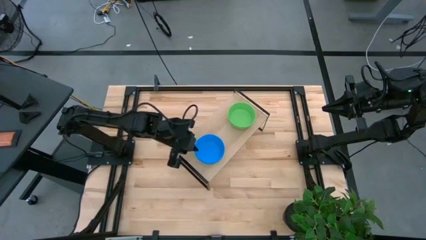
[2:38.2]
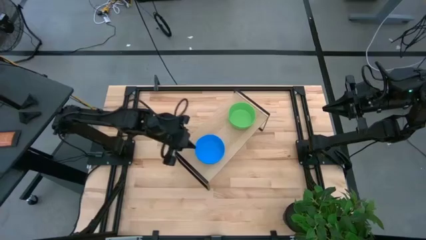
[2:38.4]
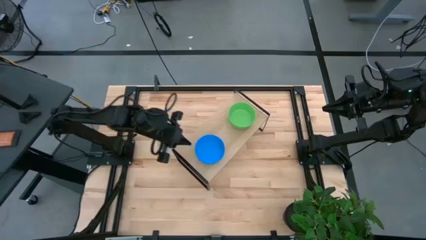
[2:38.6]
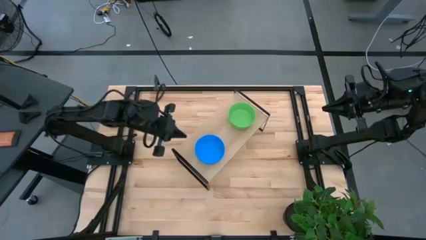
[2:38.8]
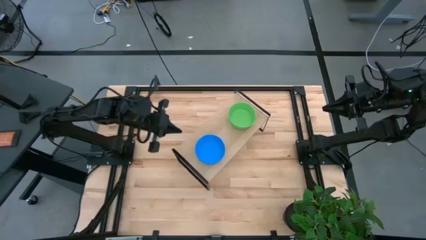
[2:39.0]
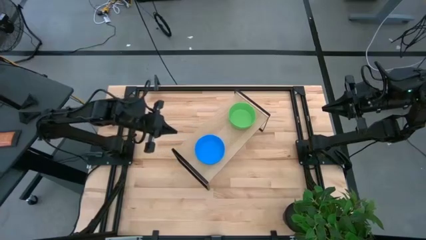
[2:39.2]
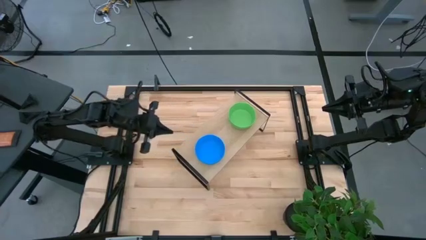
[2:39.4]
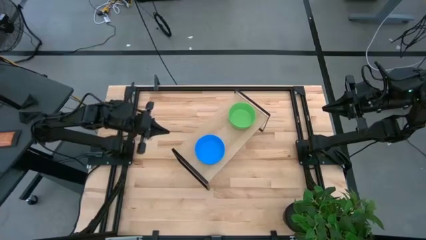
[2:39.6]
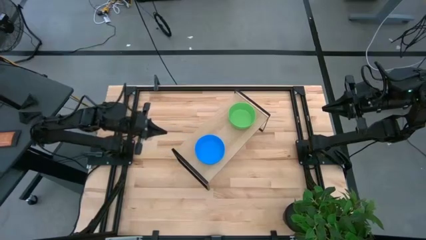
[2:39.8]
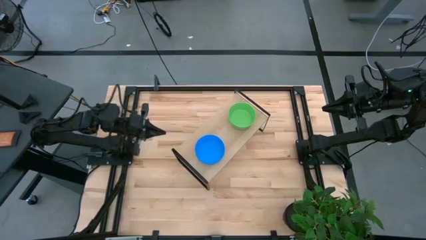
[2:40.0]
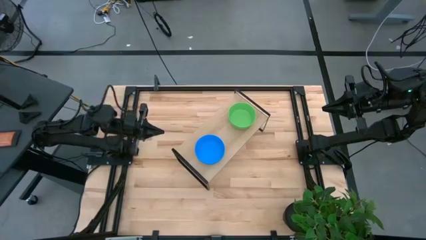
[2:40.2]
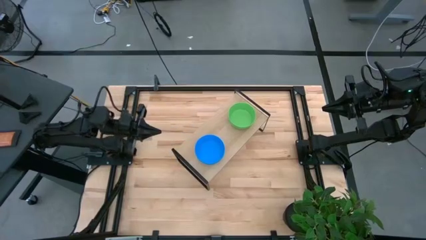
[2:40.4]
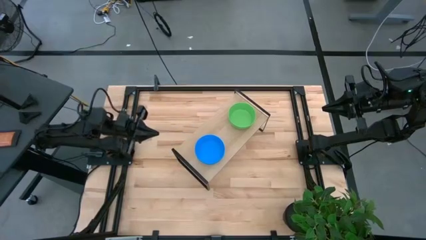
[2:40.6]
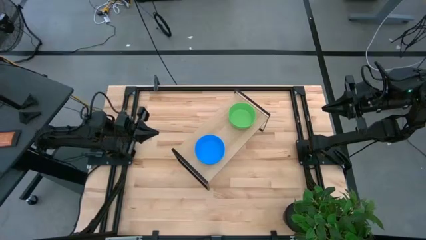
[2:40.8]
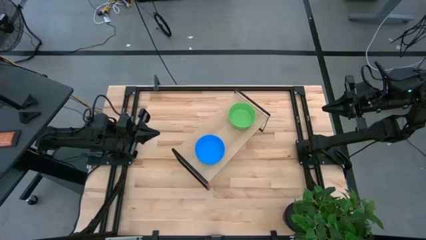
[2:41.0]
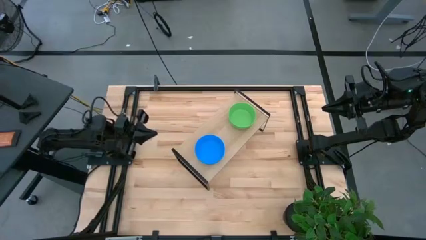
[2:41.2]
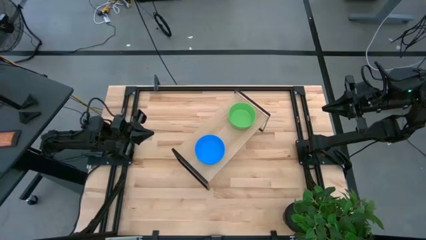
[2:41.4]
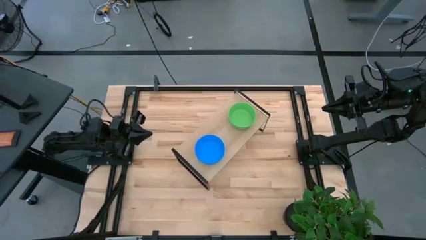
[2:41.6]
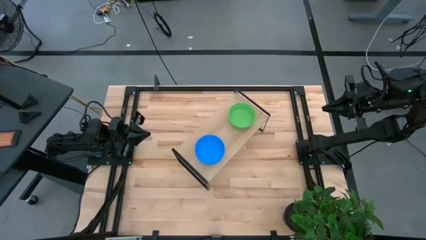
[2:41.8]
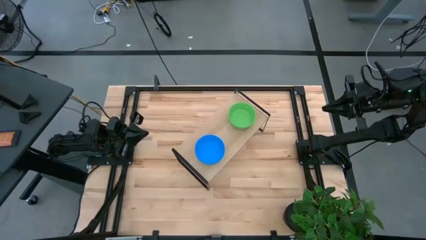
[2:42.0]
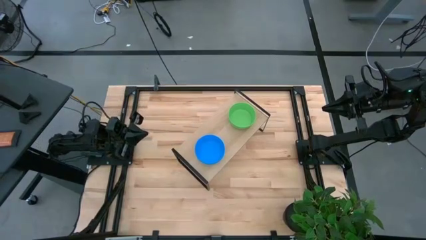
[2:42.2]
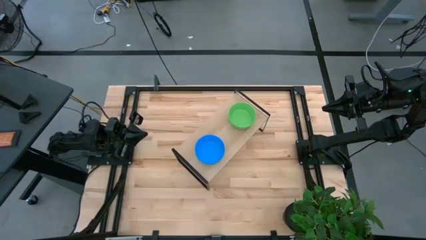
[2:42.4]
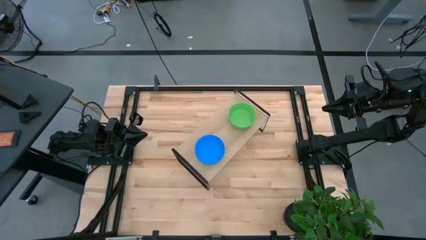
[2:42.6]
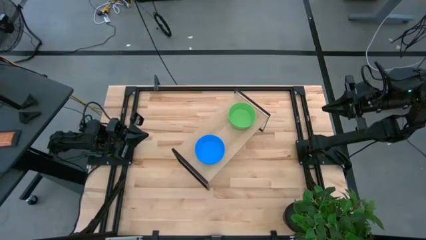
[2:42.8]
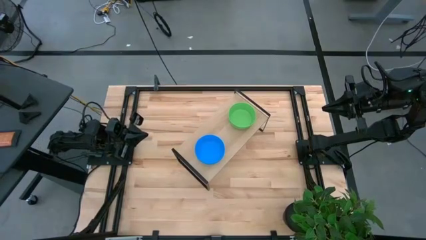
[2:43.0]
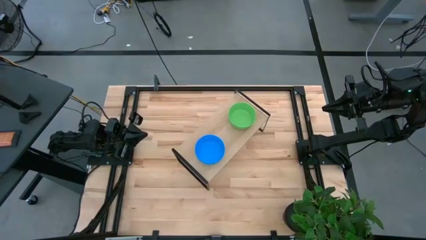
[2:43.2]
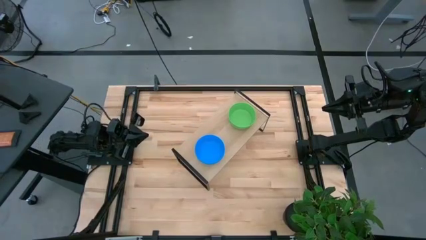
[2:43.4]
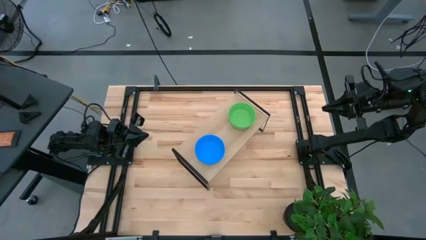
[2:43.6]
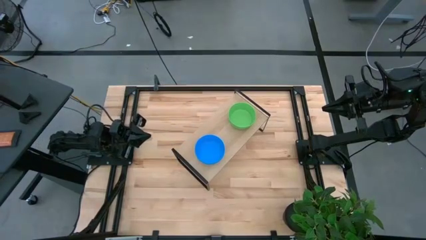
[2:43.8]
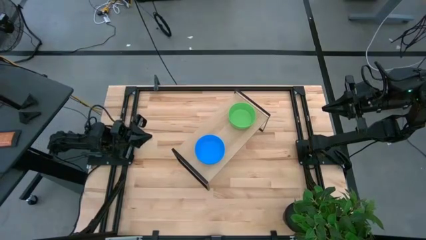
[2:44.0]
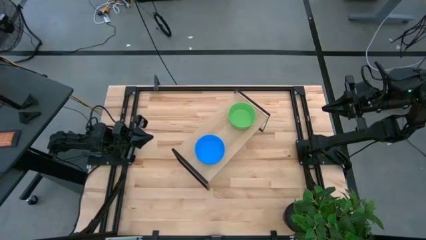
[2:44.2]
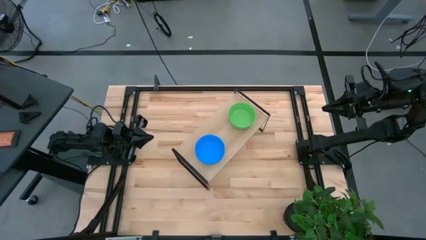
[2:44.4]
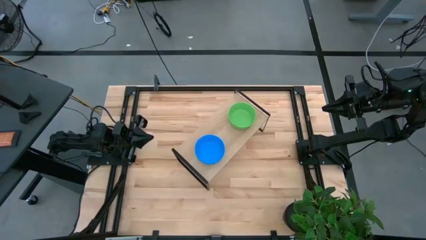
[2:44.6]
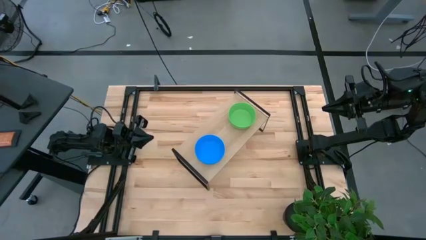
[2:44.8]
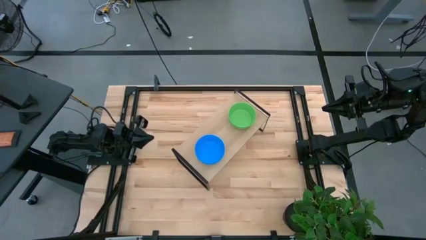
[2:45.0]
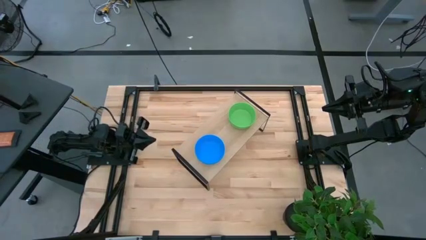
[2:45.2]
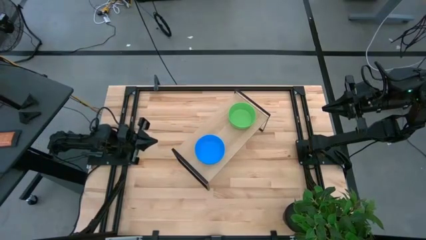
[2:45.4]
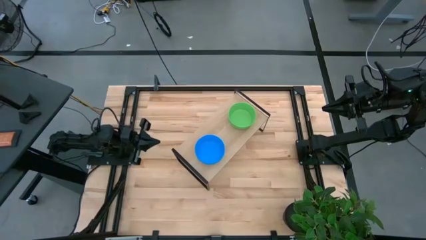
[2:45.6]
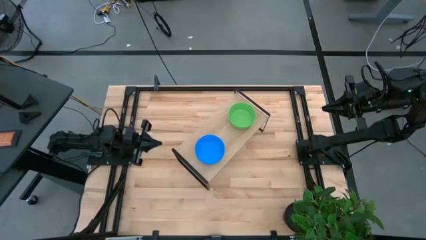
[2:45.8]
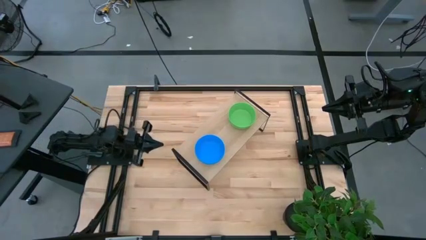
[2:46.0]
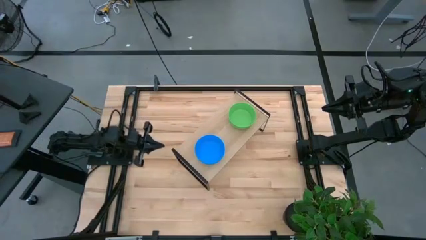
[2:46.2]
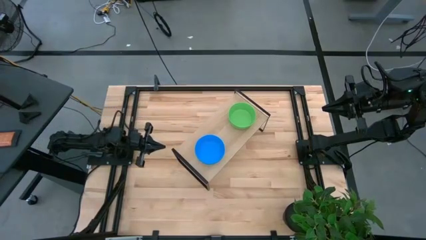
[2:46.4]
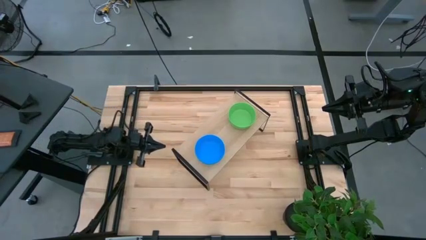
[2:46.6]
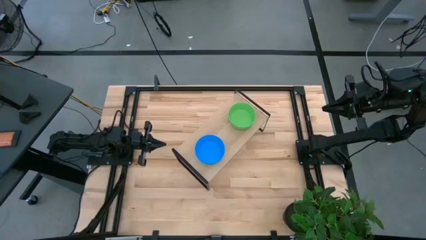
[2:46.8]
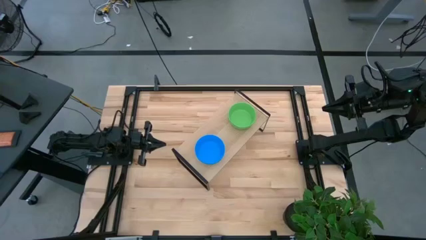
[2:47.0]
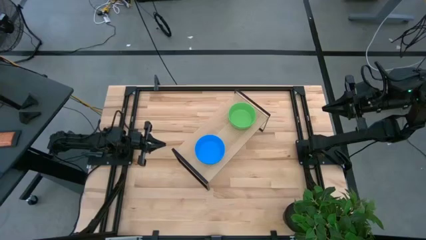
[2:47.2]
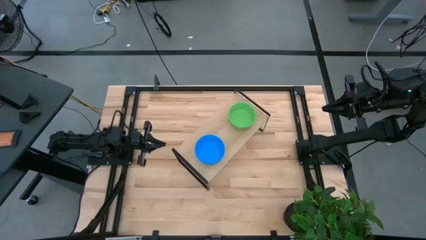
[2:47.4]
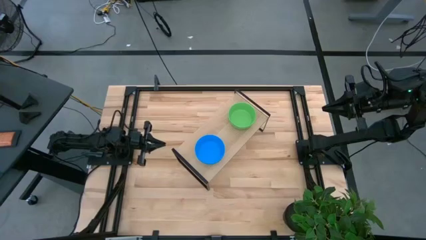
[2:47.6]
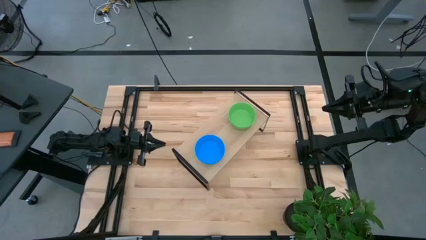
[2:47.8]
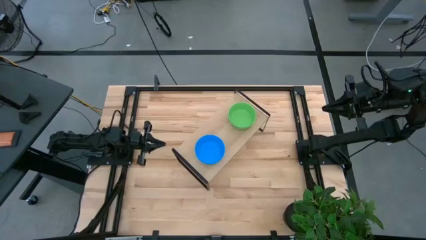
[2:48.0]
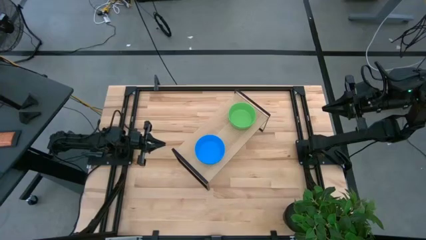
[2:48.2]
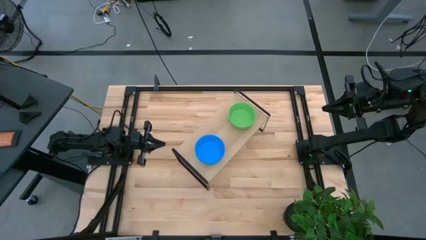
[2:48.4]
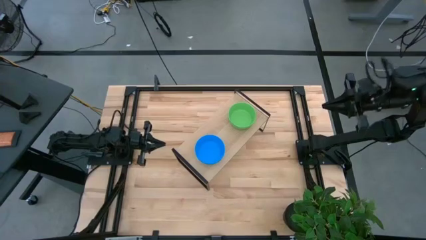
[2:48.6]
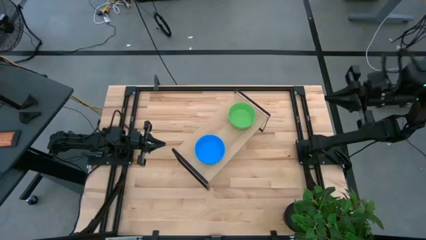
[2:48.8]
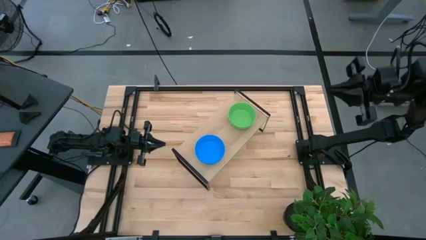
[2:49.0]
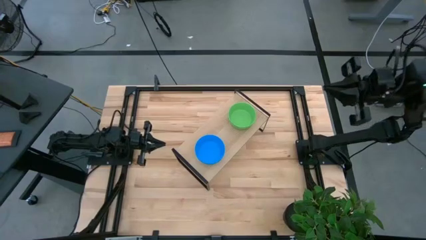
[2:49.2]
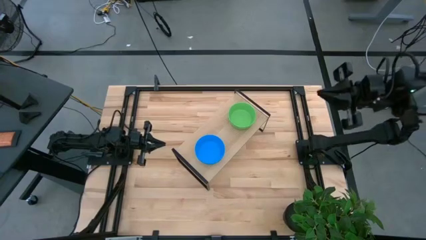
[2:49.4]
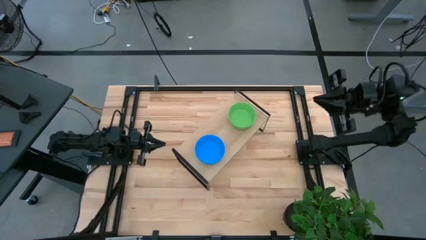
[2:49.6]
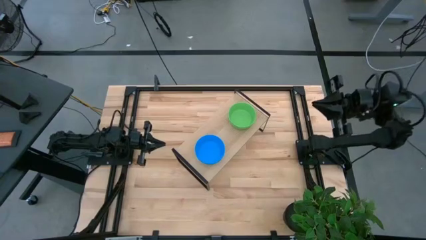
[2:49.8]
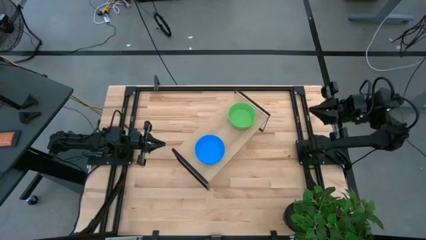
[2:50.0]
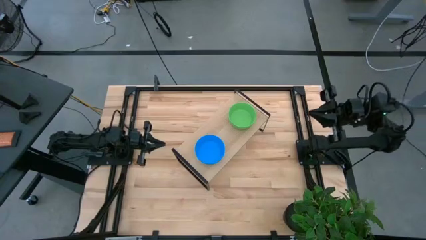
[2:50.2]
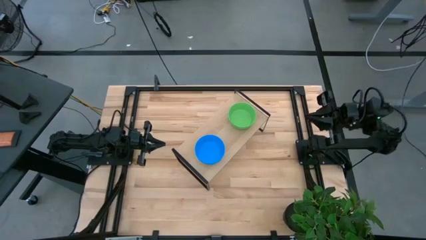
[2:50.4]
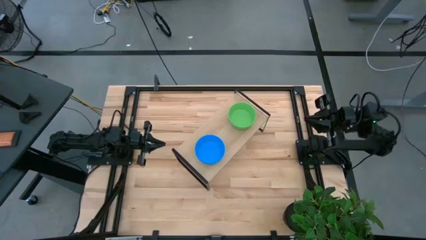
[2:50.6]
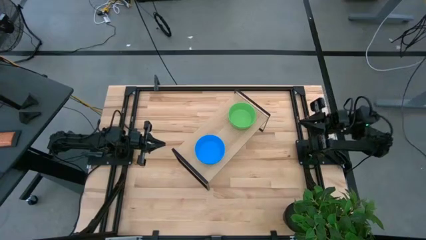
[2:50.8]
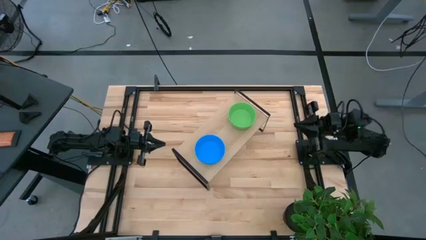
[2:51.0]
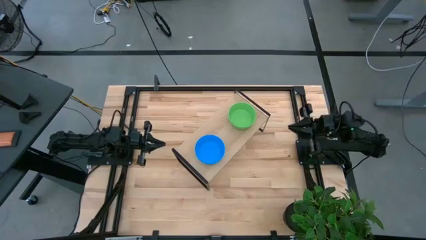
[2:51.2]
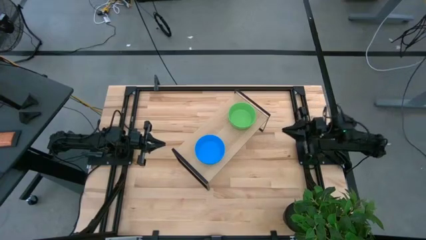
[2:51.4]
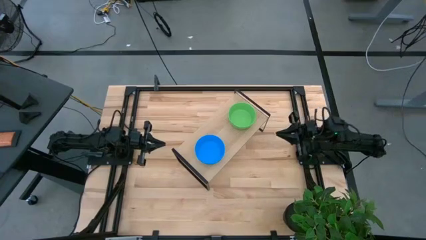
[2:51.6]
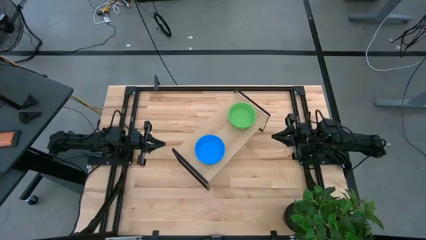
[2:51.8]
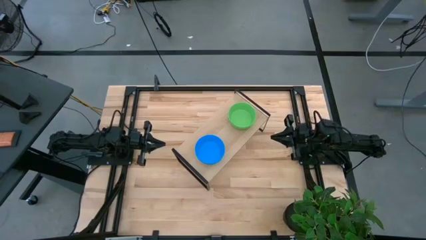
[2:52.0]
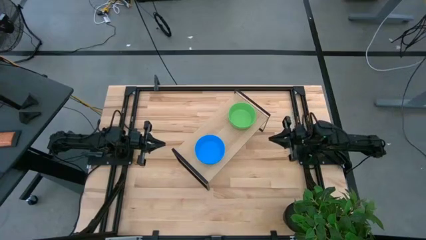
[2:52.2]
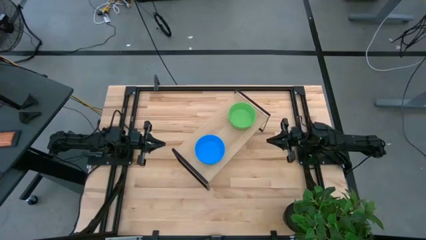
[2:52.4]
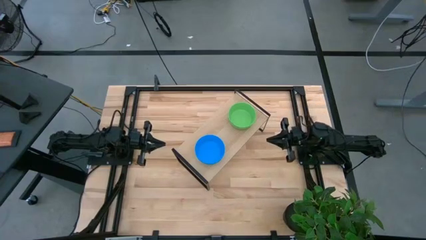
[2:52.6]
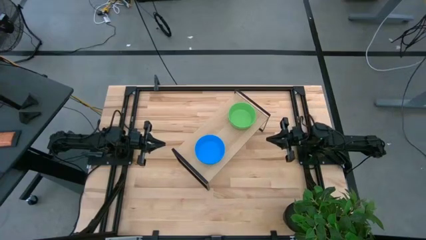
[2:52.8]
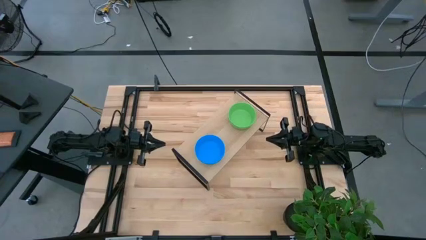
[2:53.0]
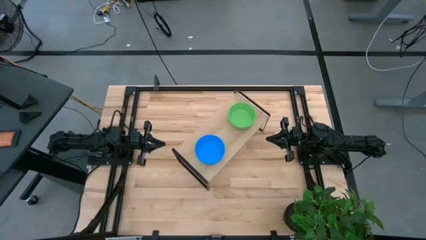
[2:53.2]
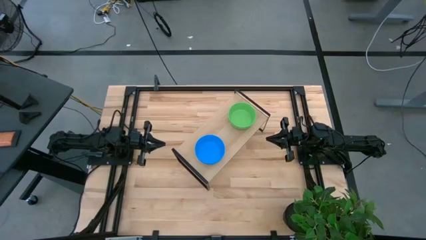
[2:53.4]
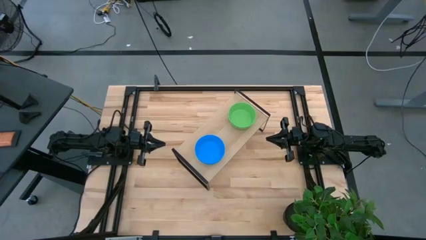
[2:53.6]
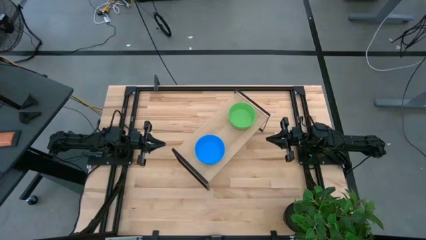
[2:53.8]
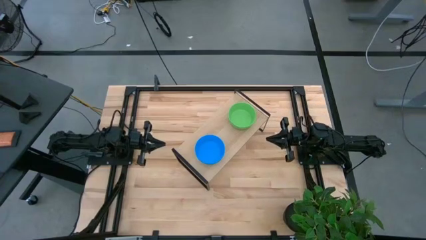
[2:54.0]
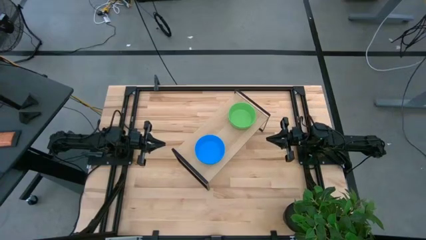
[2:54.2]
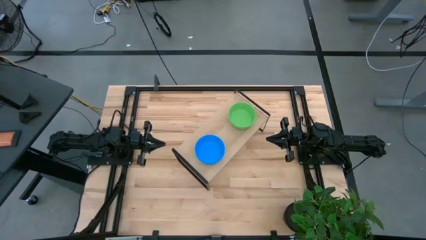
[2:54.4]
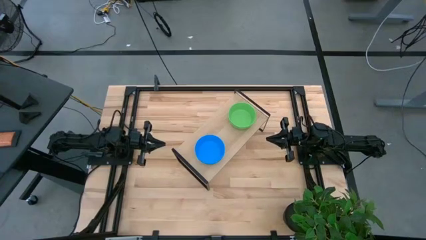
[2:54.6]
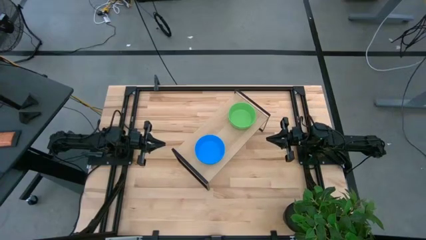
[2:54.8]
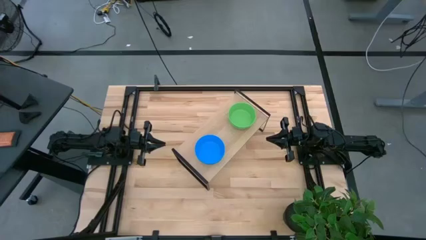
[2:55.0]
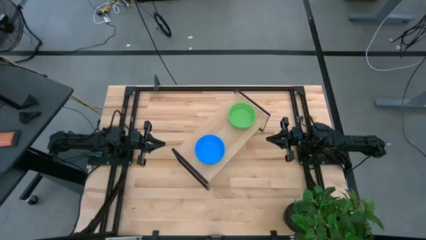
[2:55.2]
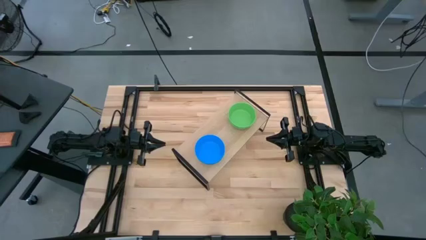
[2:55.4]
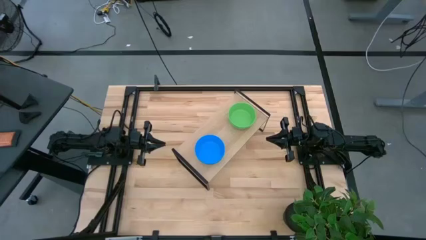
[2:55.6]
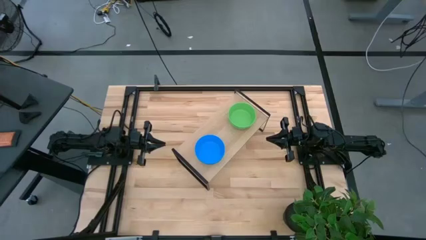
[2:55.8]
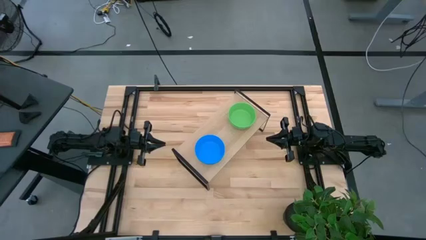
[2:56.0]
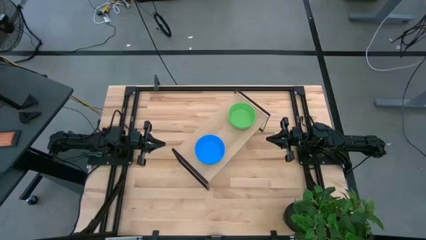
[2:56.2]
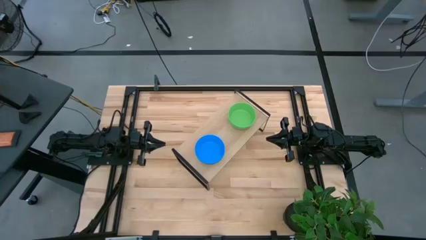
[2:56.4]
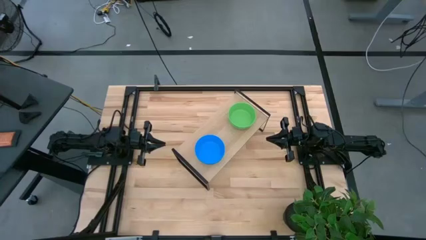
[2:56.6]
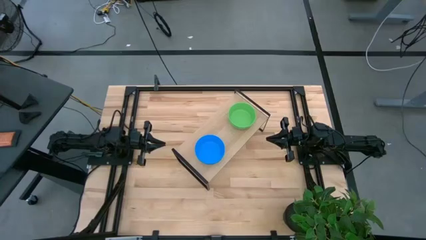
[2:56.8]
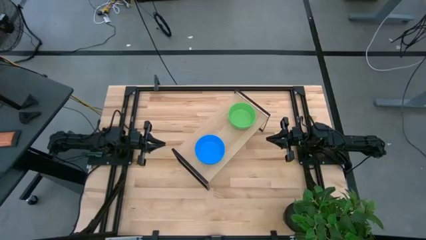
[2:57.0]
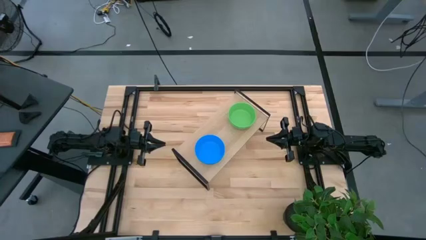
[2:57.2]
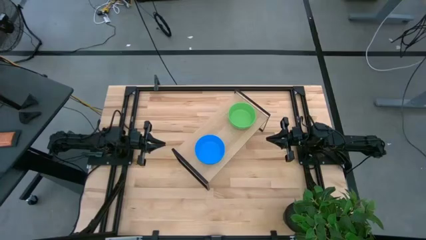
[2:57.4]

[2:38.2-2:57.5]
Task: Pick & Place Mini bowls
Return to Home Position
